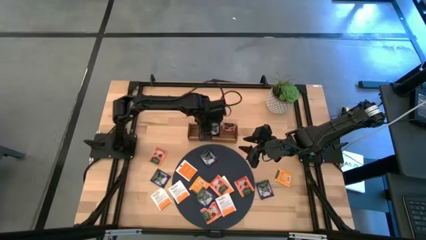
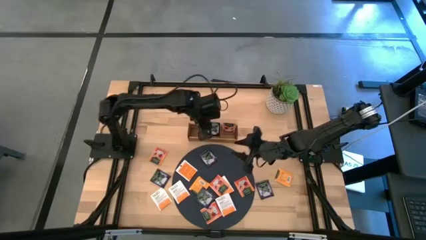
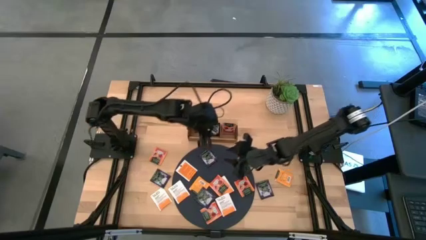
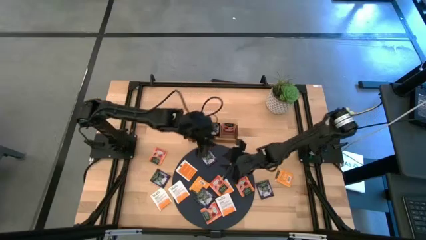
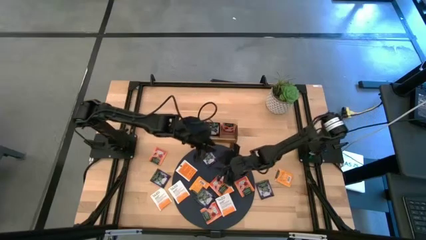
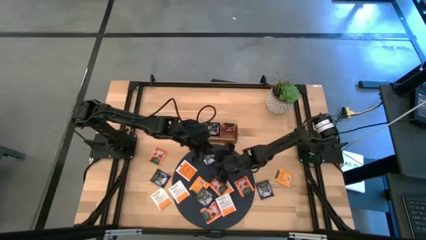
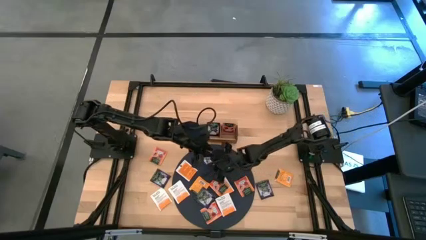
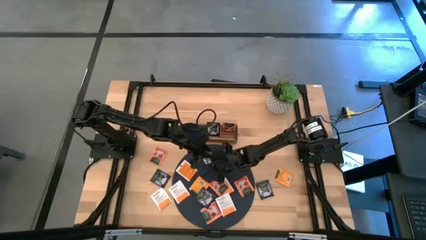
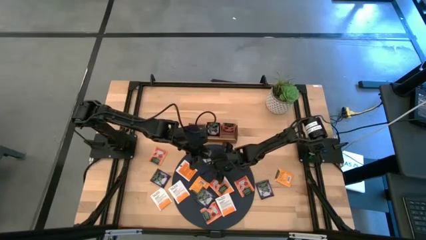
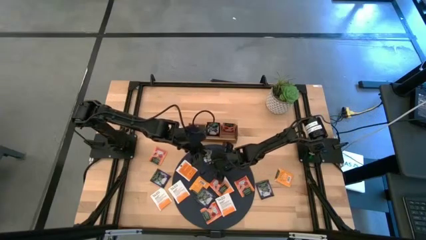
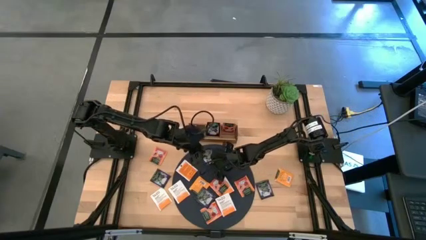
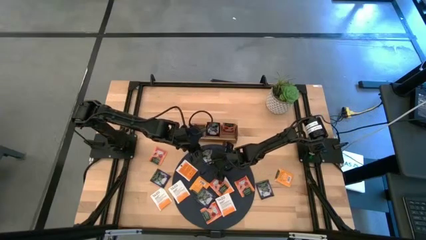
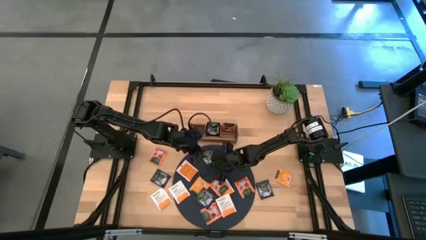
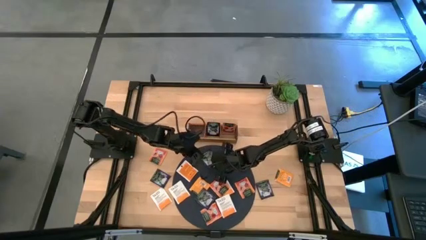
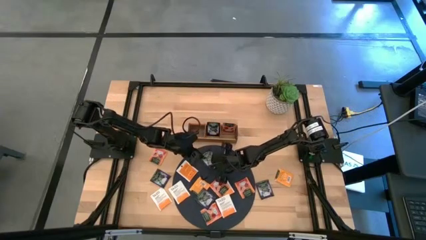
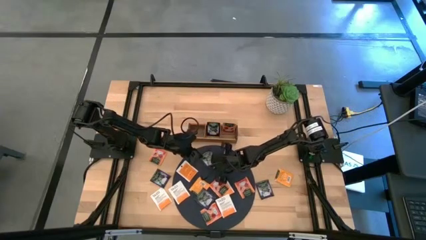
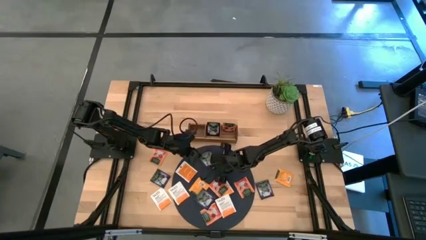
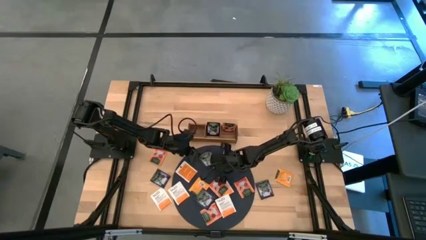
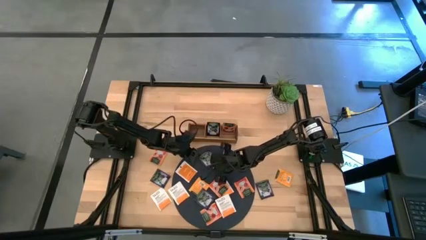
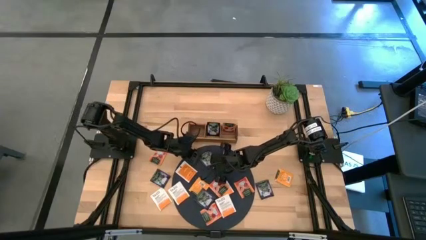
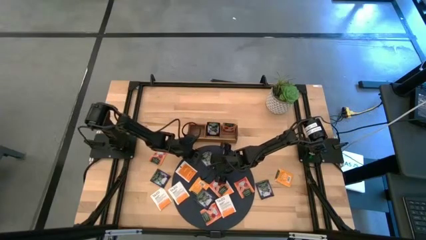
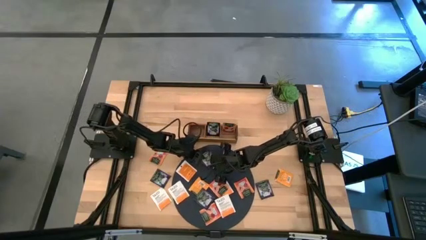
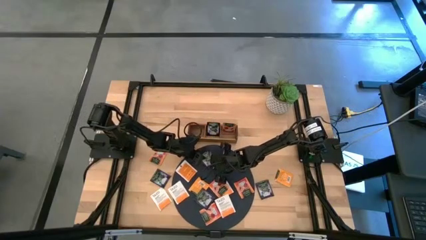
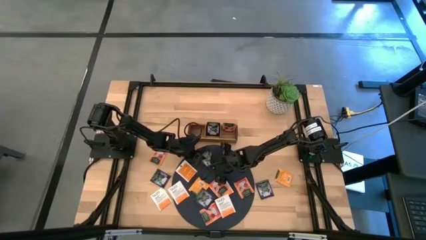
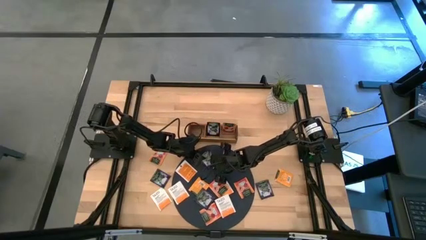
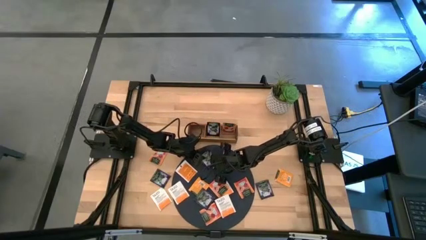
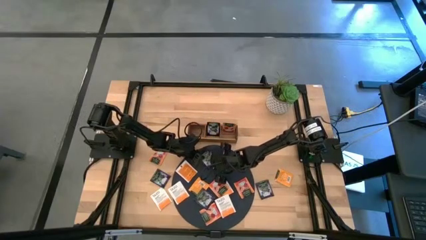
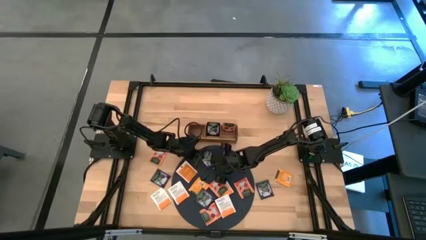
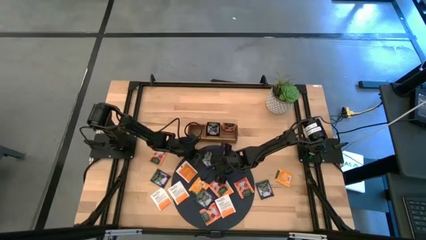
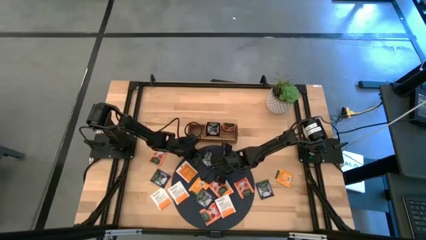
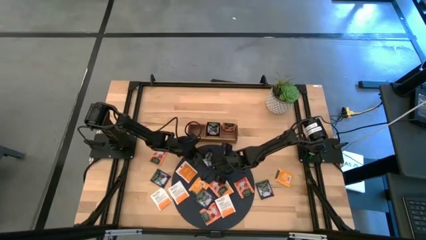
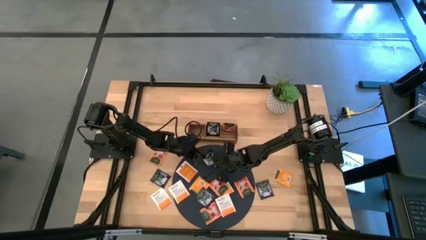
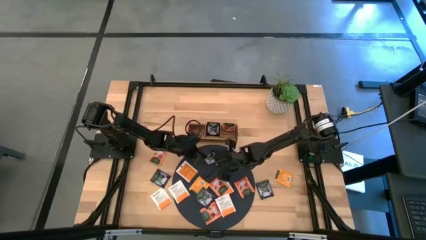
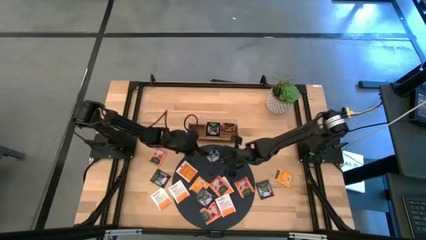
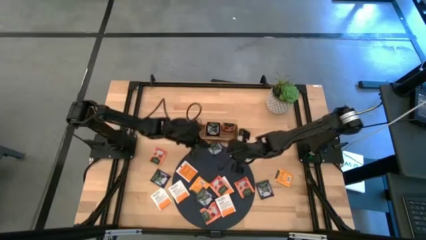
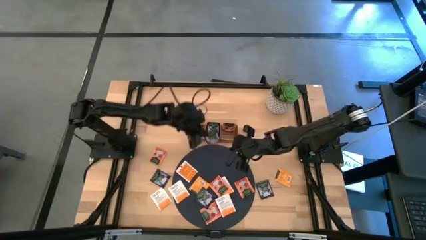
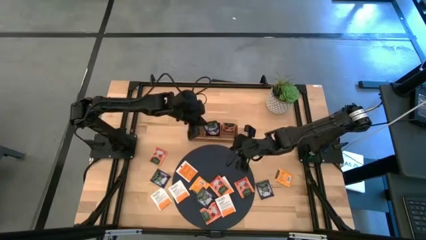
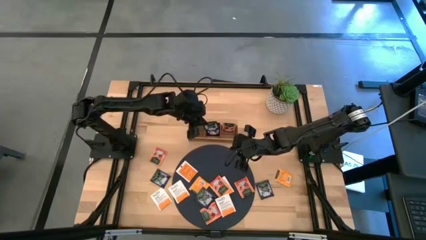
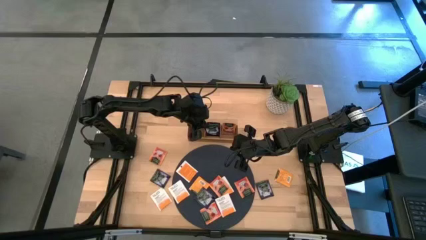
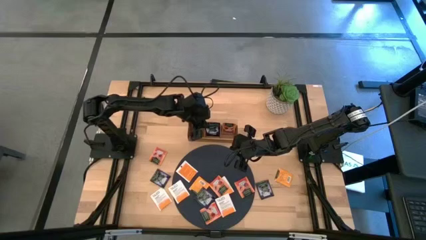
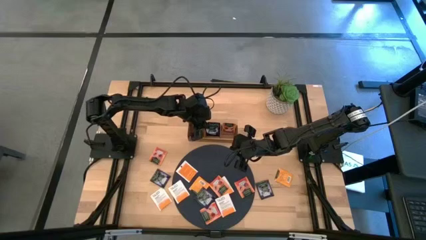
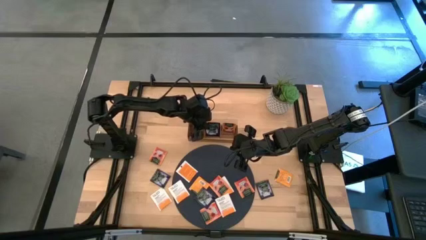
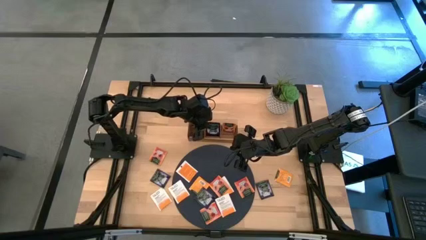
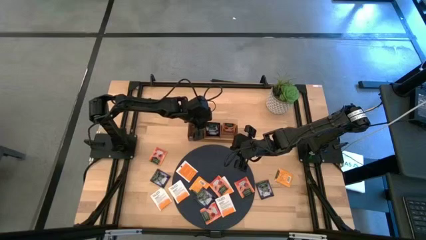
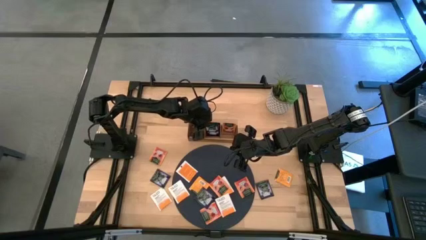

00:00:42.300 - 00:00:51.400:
Task: Pick & Place Tea
Put the violet tea bag into the middle of the wooden organizer

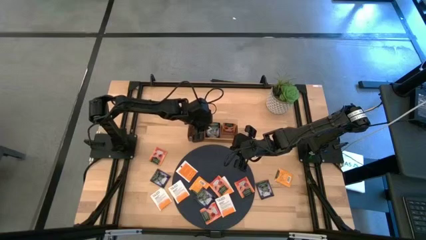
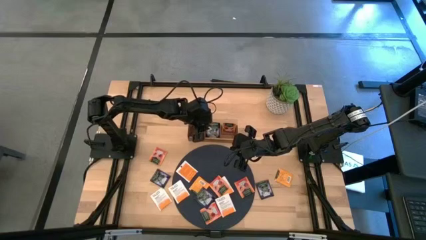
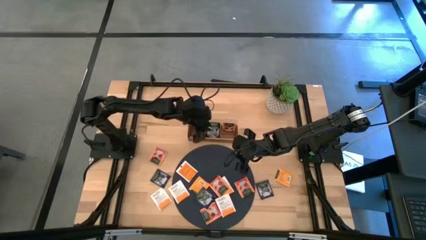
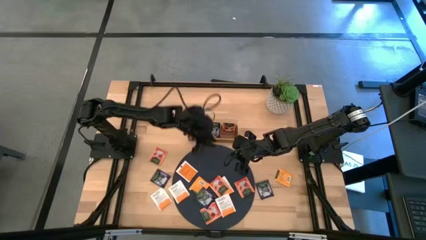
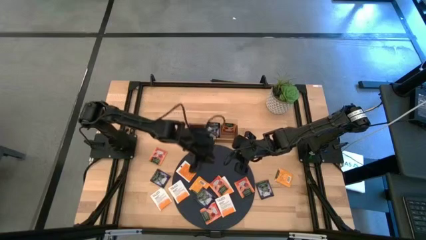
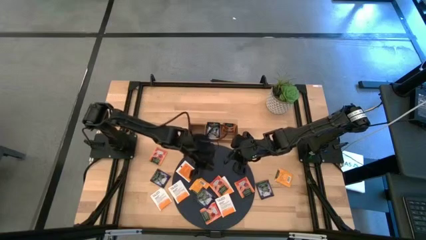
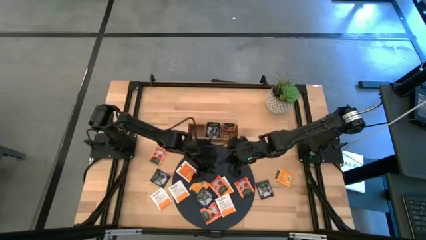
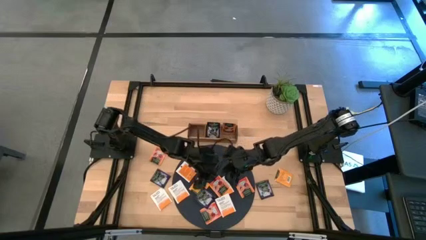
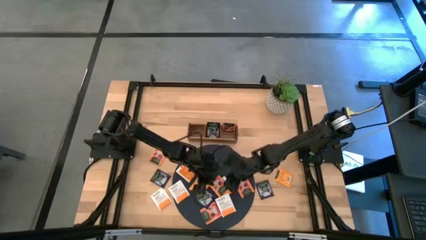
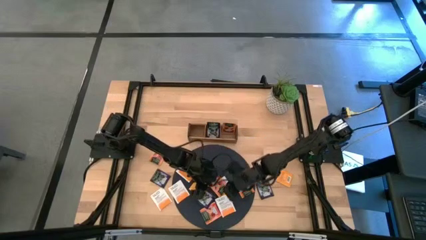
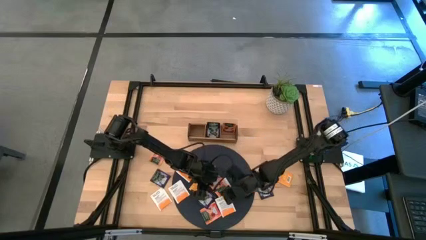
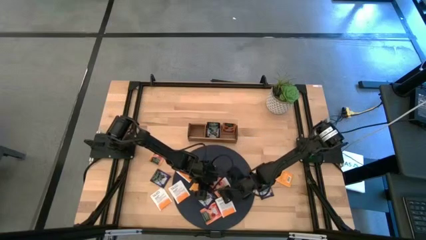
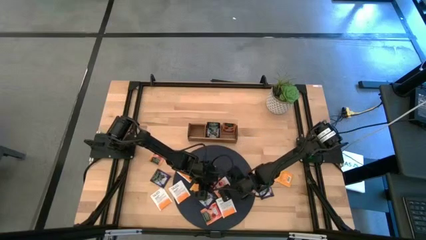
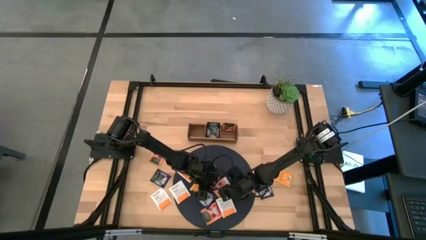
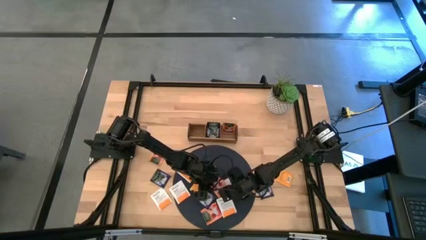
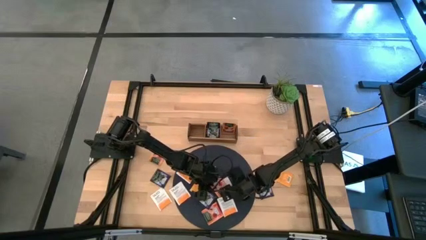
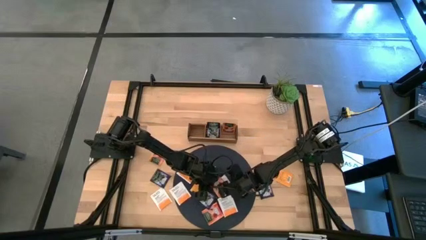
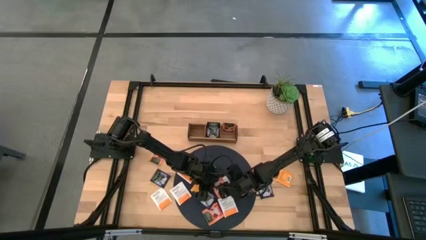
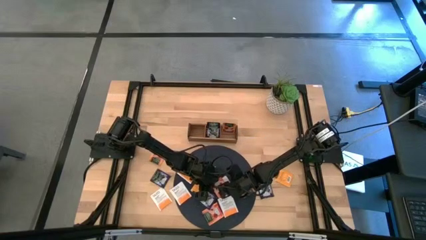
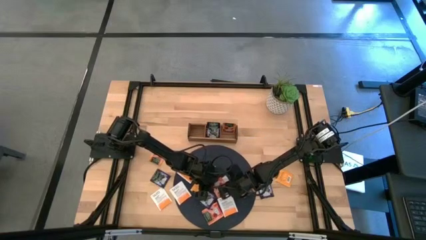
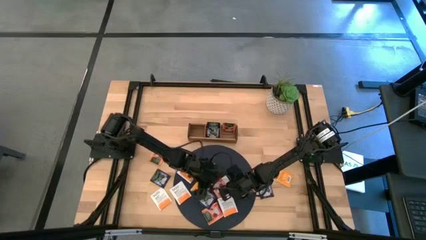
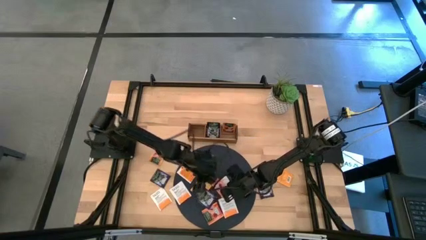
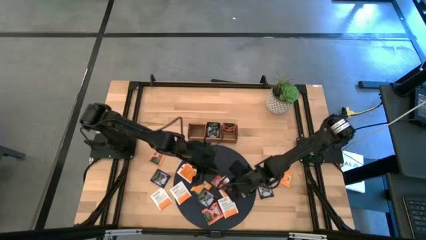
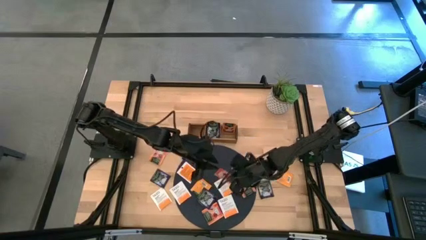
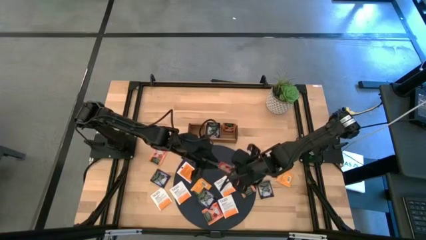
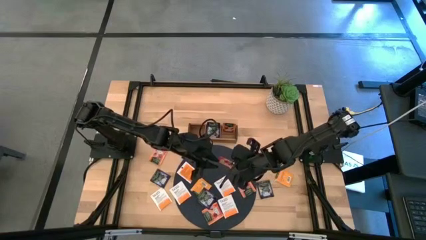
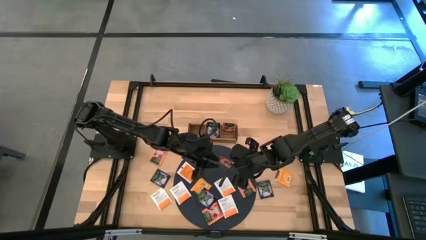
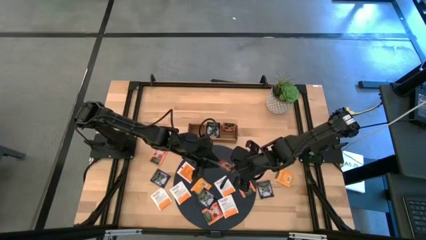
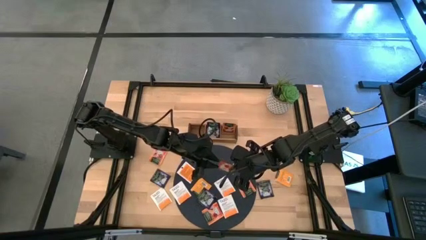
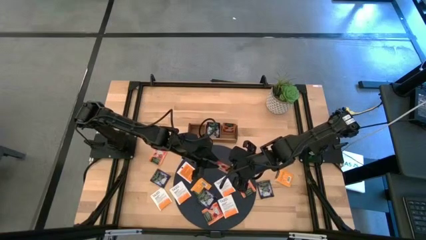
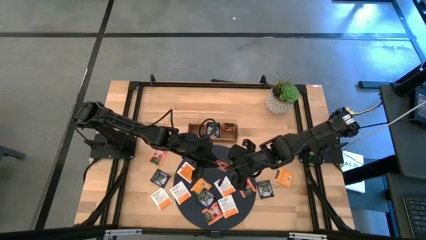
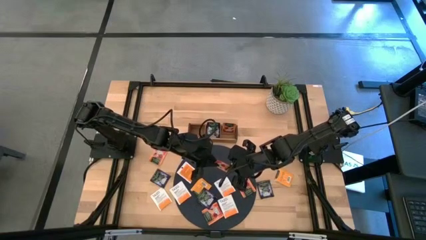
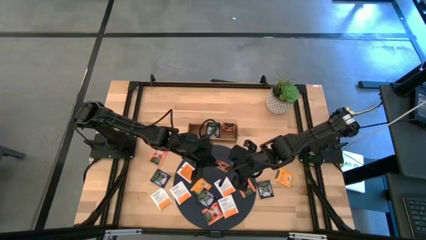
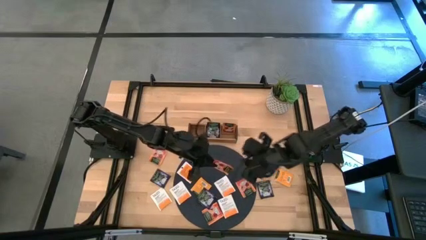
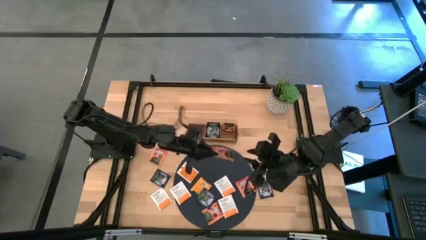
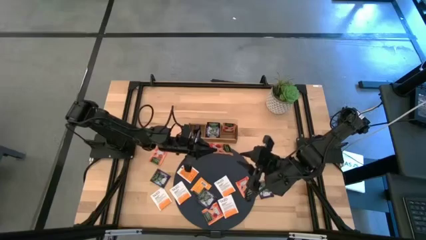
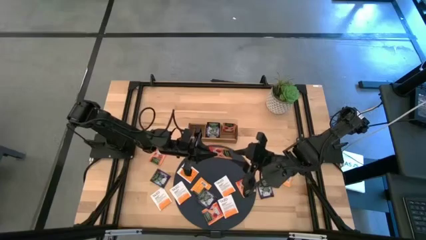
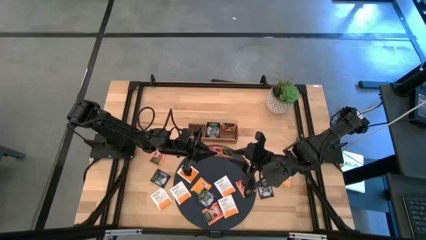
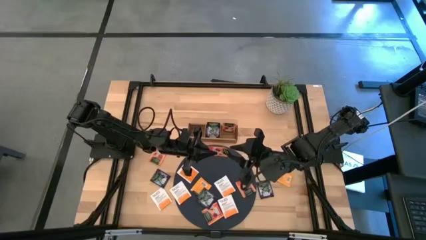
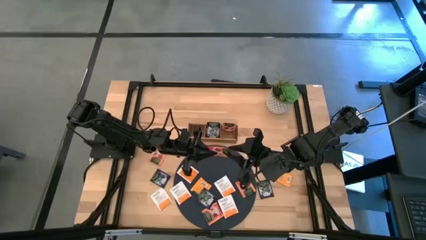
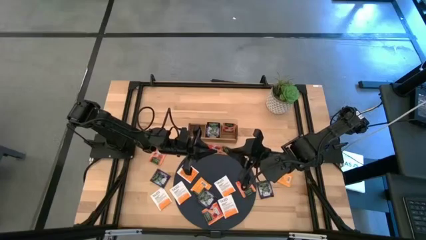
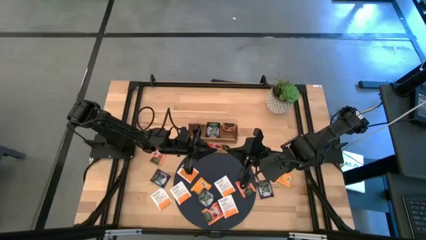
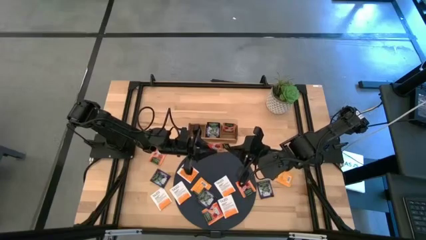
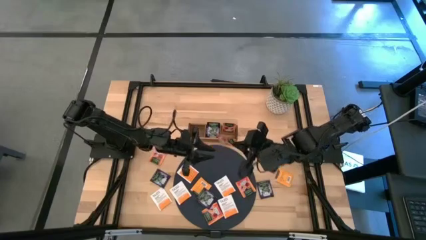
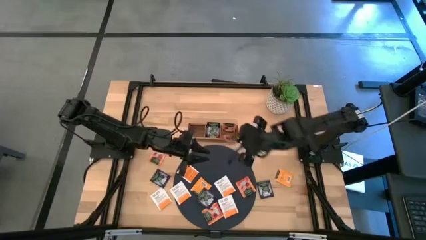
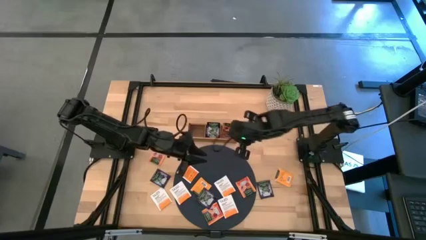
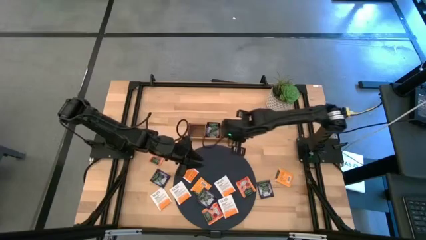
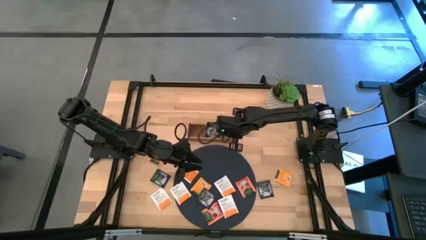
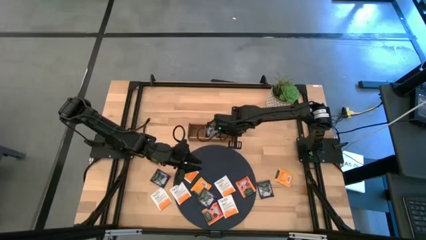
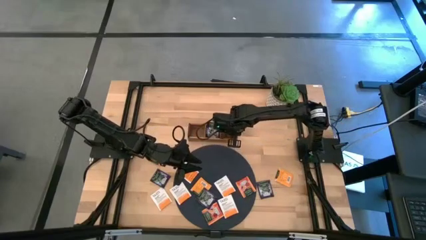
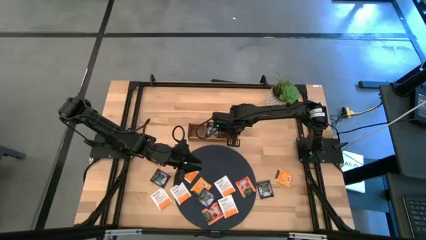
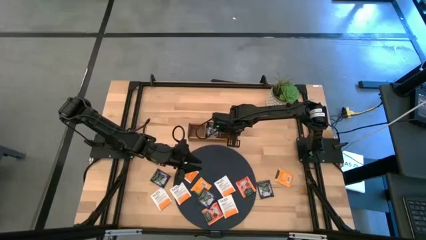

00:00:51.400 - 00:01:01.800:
Put the orange tea bag into the right of the wooden organizer
